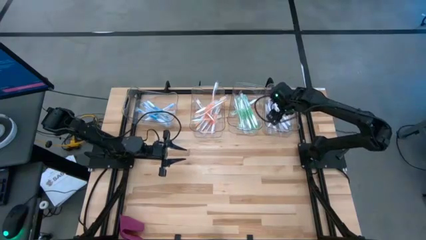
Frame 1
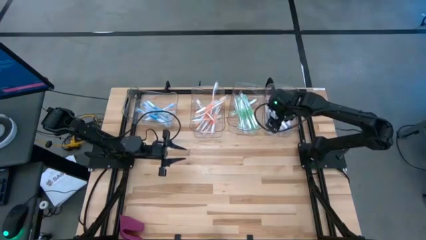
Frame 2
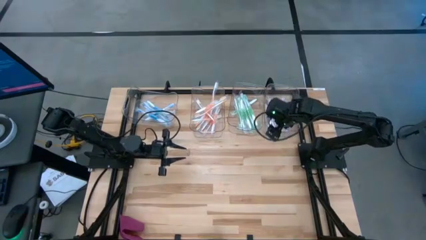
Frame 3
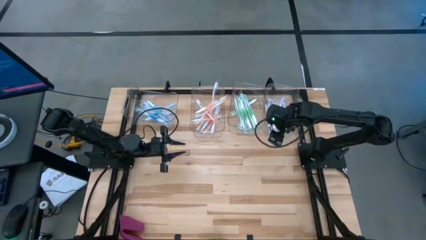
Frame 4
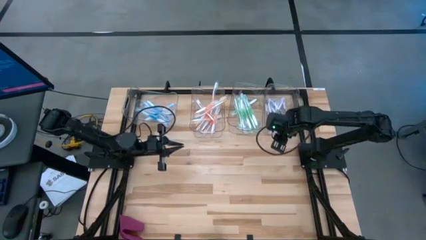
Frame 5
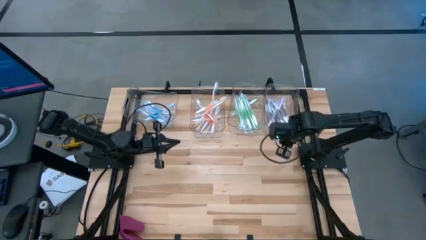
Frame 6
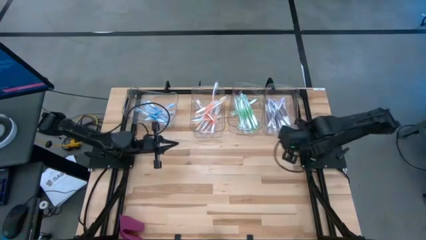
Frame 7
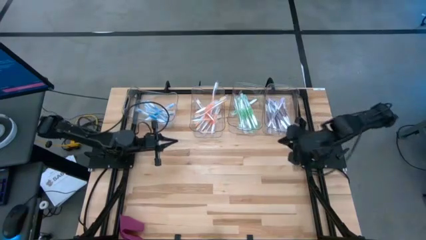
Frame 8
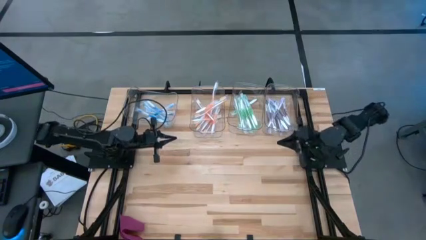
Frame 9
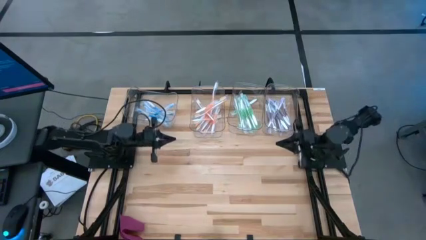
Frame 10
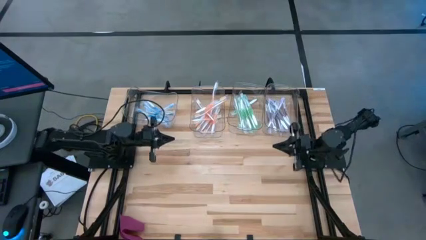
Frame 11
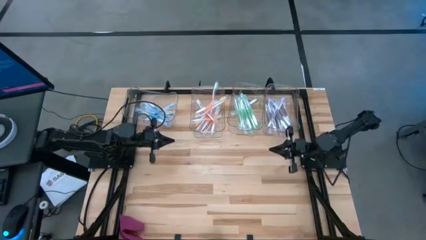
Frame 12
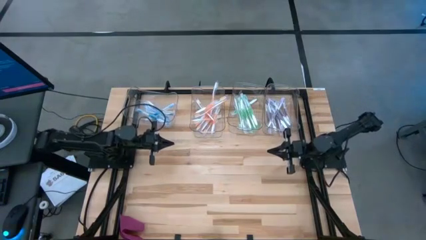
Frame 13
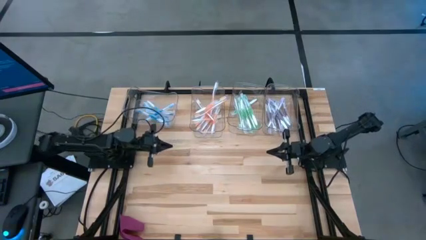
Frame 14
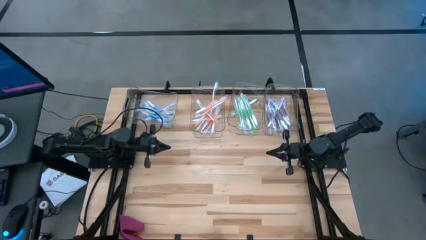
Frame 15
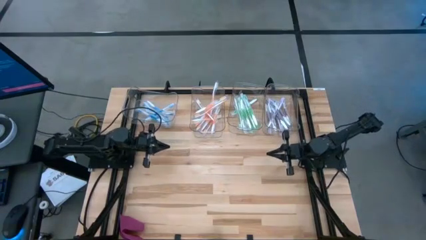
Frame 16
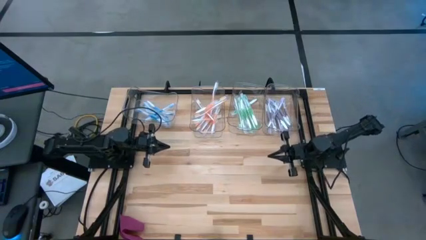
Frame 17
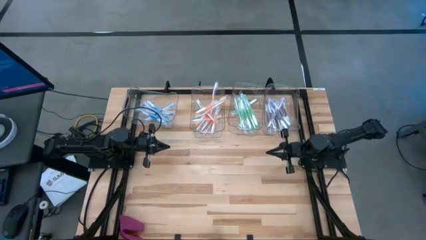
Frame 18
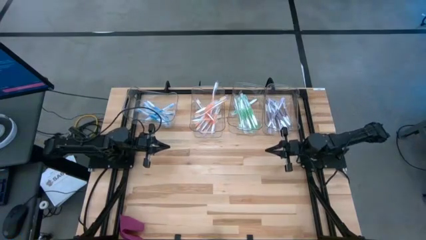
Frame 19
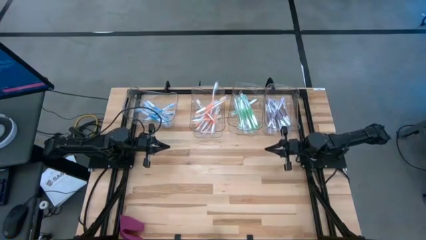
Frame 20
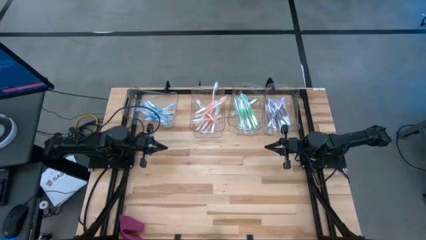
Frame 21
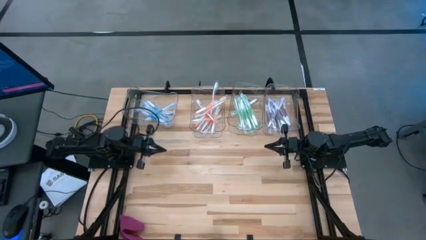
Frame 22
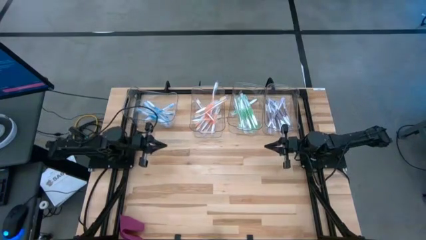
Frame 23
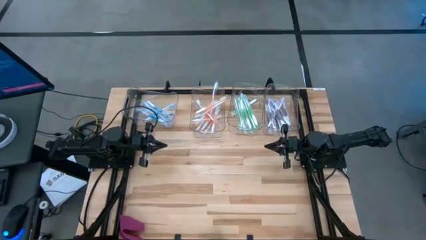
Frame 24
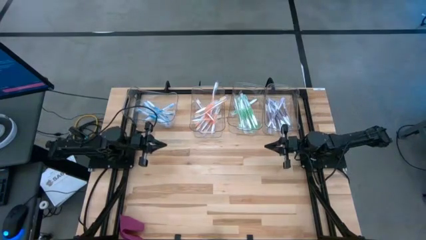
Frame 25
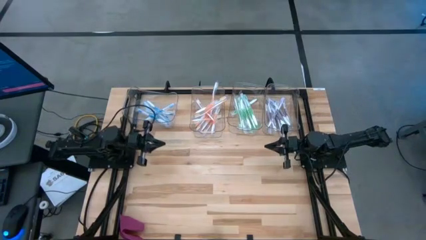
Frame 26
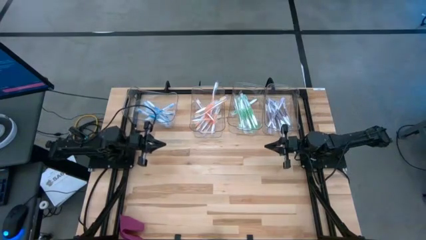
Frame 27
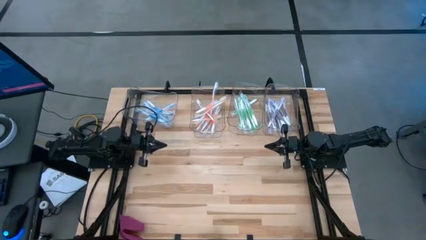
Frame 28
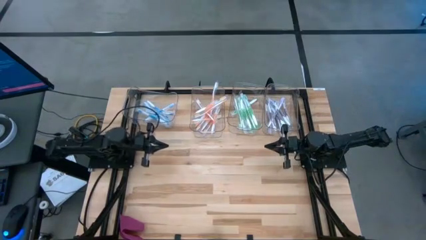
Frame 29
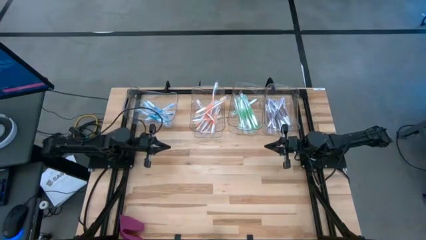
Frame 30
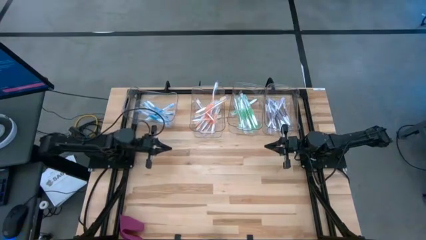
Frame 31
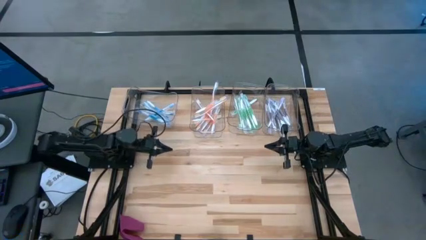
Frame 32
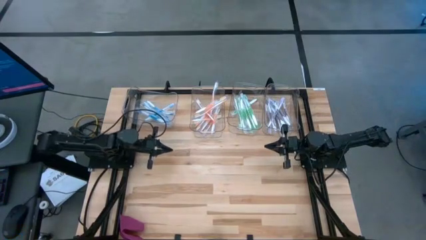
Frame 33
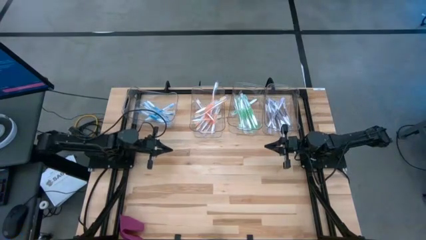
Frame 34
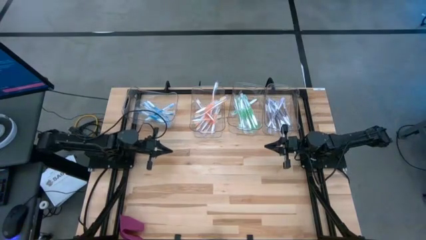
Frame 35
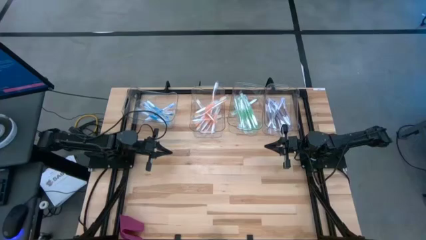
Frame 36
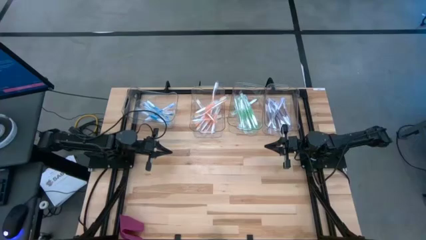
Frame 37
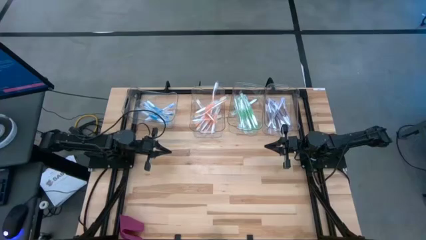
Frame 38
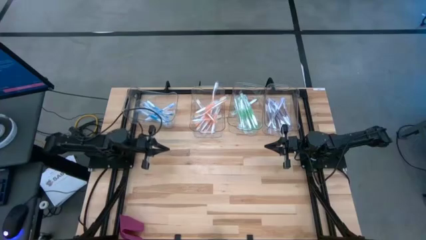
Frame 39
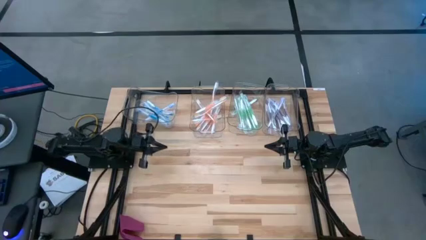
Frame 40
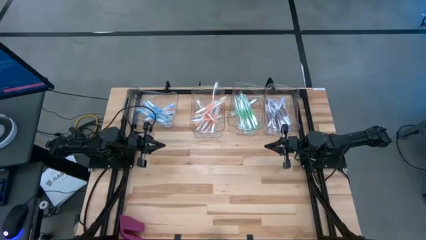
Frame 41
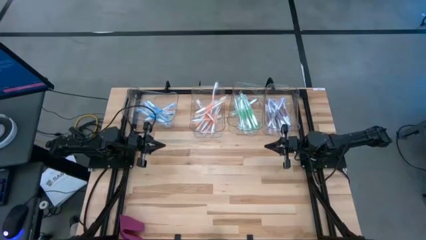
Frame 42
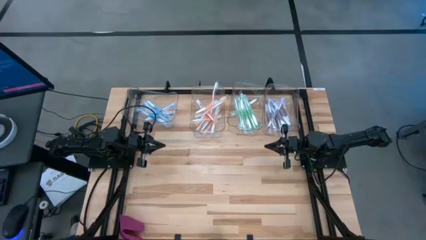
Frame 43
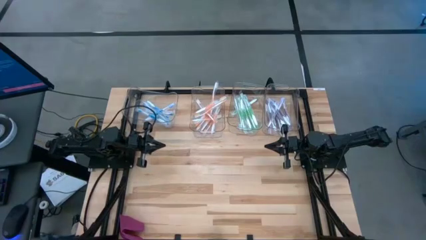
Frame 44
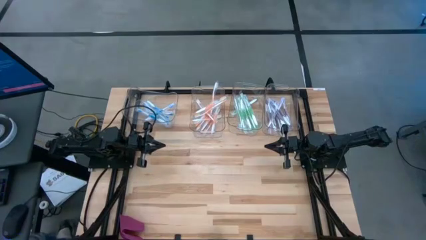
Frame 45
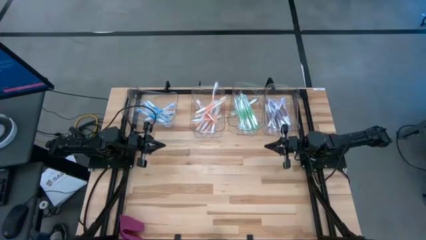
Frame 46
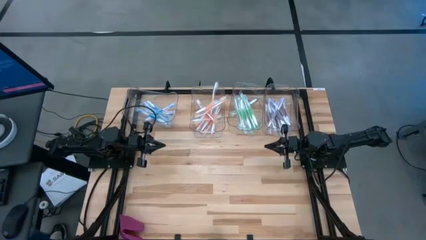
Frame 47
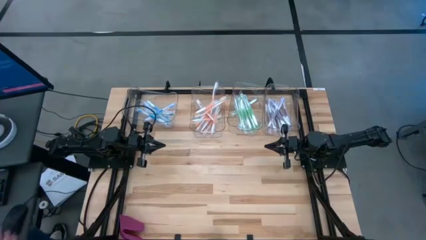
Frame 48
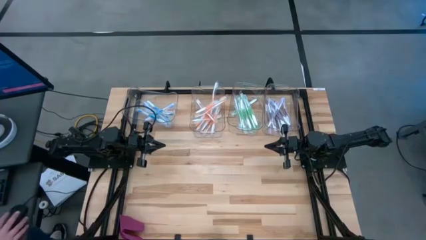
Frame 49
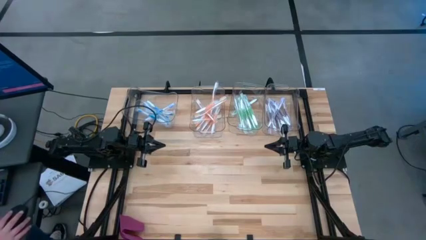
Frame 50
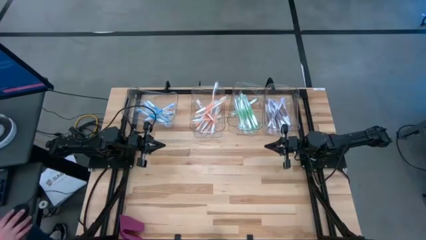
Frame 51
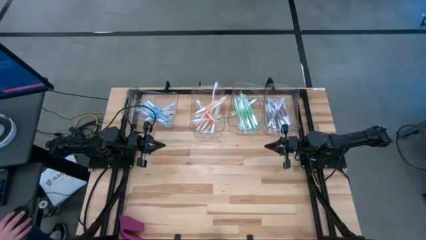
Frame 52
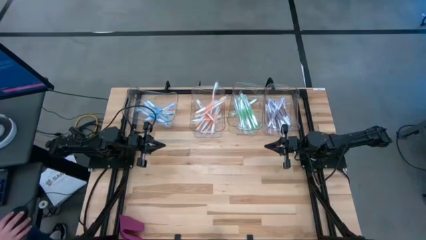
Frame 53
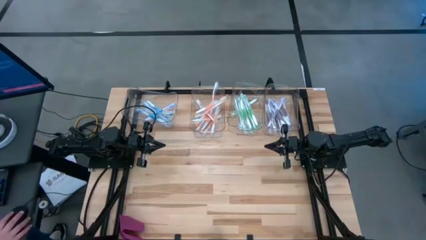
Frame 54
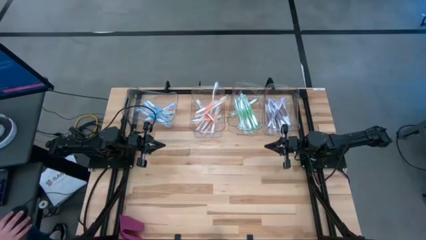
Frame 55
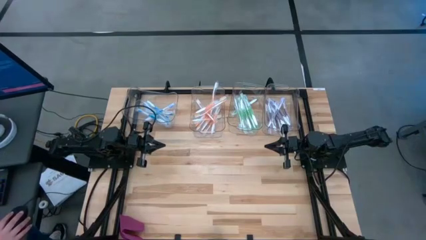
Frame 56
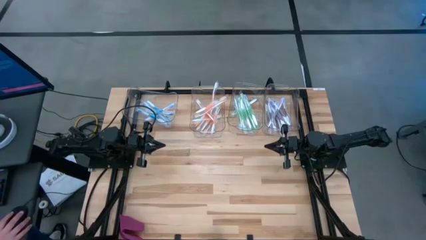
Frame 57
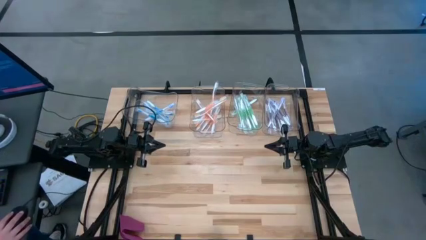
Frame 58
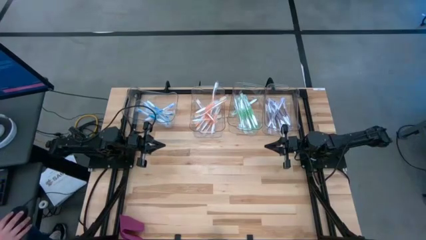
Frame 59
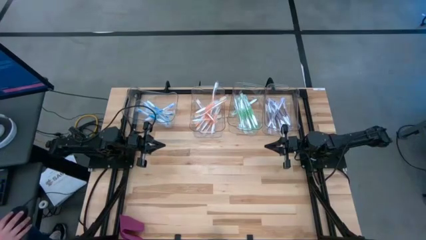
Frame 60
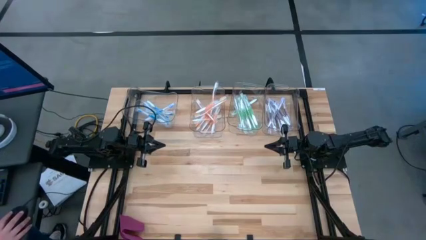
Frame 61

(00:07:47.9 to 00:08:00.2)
Task: Pick & Place Toothbrushes
Return to Home Position

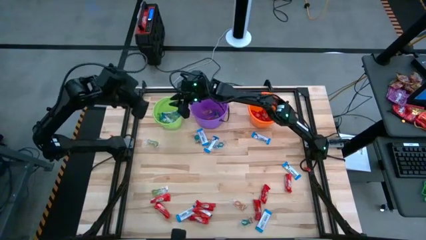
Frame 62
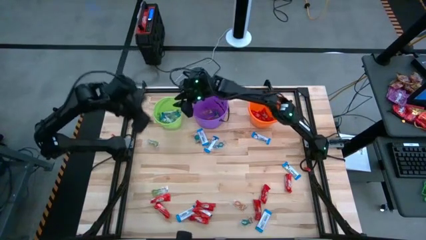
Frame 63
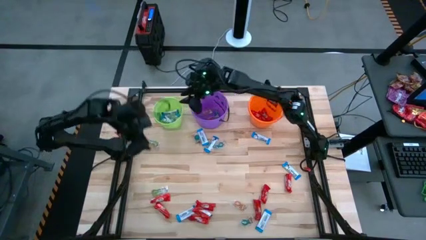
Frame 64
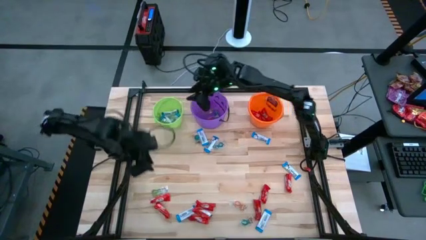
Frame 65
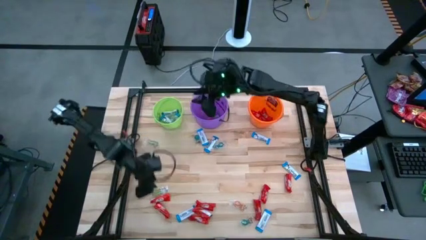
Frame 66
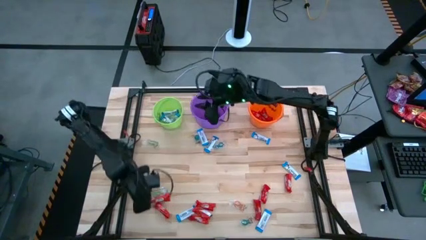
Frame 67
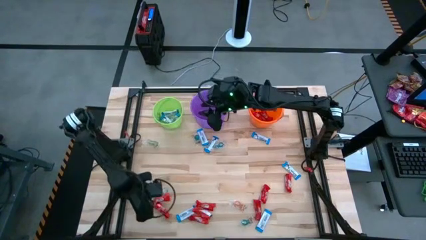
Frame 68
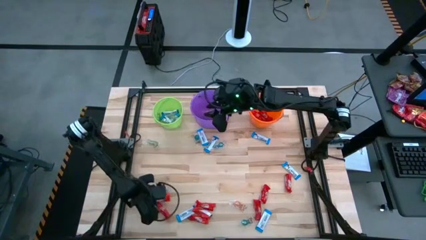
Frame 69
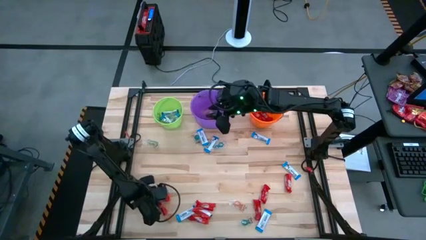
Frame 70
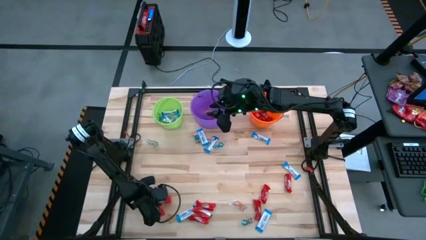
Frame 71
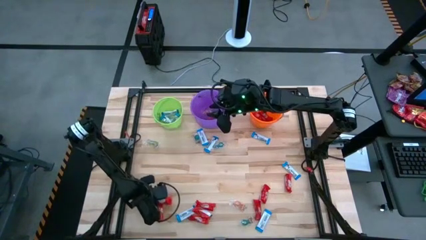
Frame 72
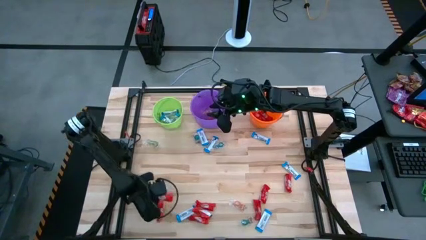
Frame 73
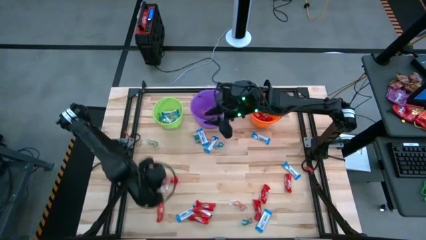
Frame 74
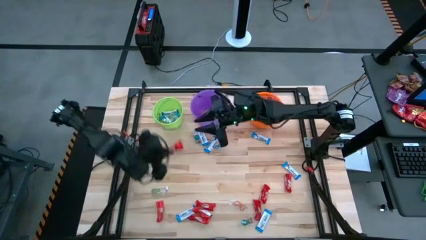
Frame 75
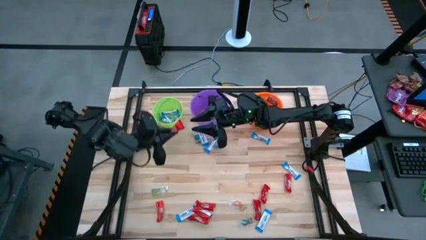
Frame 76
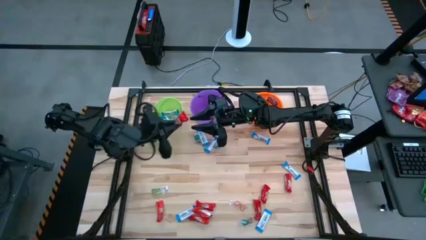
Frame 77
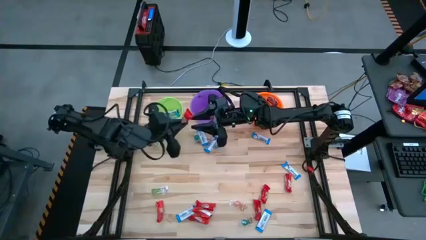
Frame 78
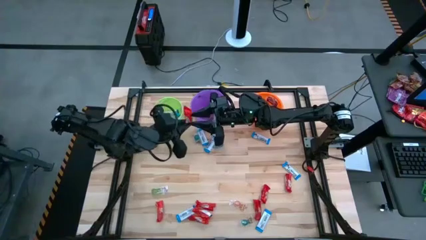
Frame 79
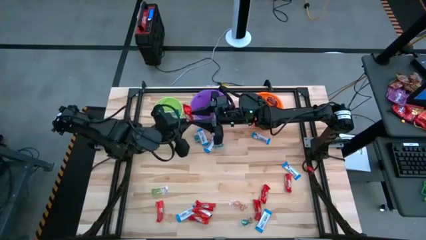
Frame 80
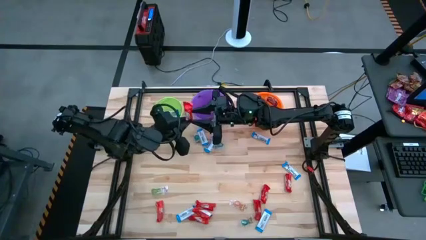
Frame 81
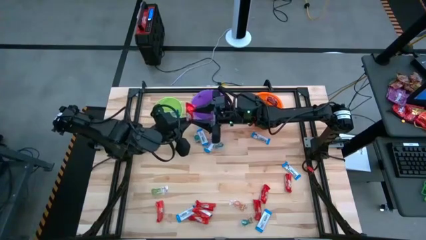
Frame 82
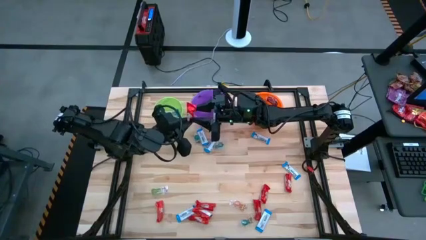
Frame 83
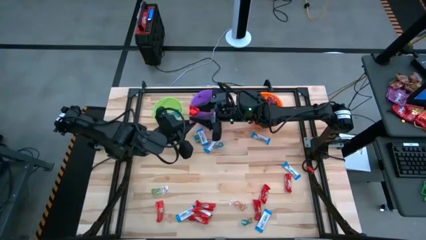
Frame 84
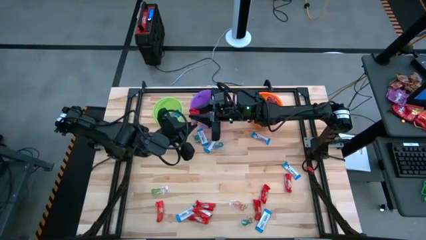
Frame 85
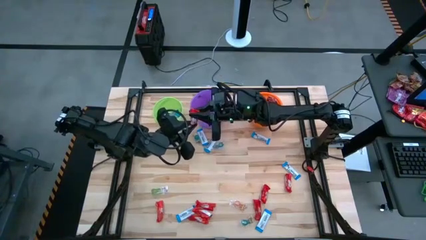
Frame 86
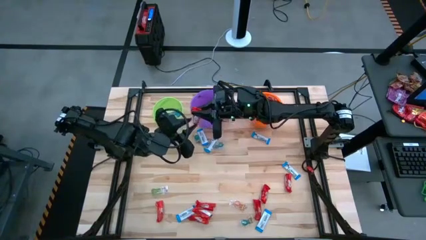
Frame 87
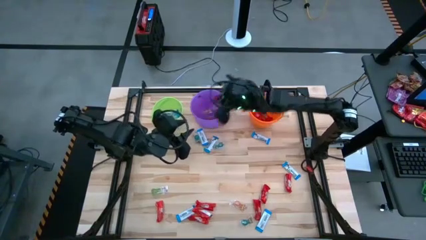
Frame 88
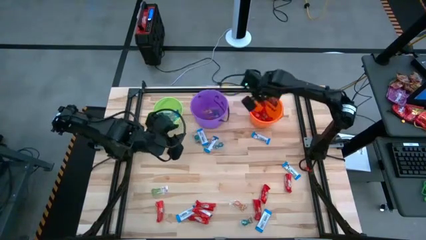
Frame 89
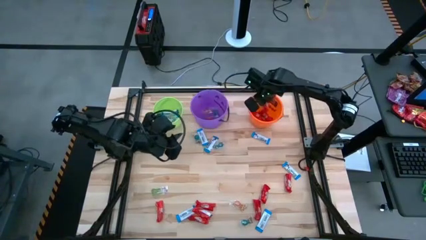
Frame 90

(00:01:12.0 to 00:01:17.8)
Task: Sort candy by brand, put in halloween buckets
Put the red chocolate into the orange bucket
